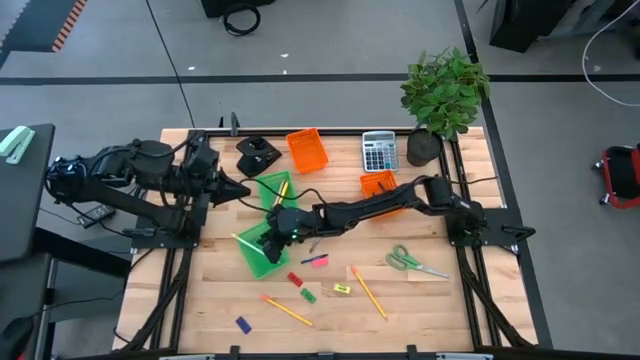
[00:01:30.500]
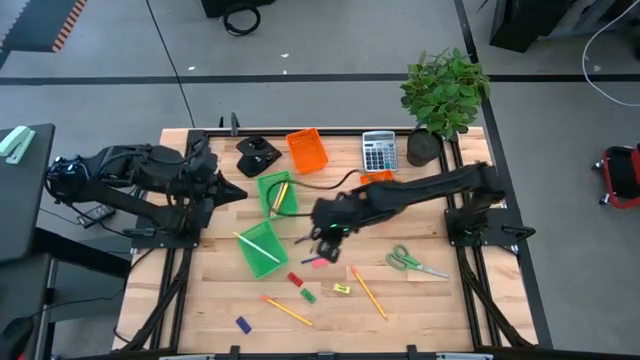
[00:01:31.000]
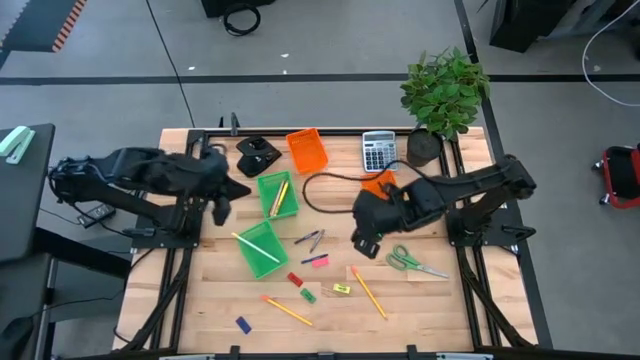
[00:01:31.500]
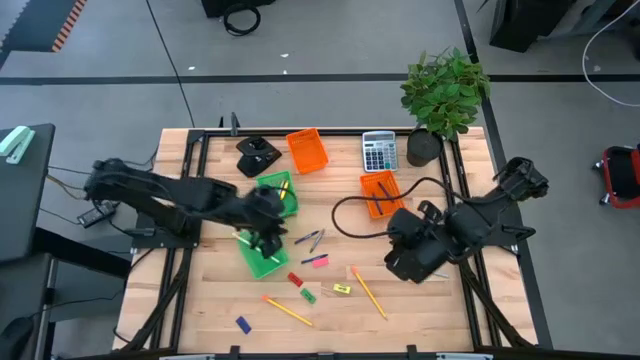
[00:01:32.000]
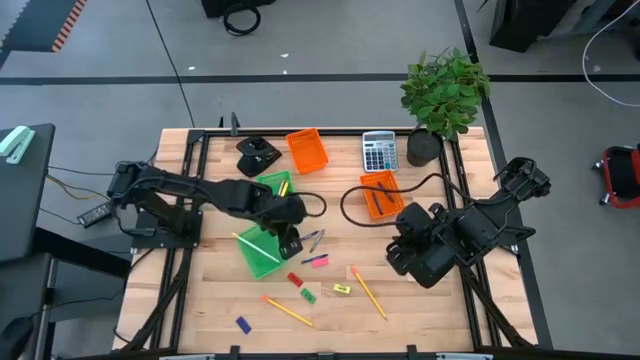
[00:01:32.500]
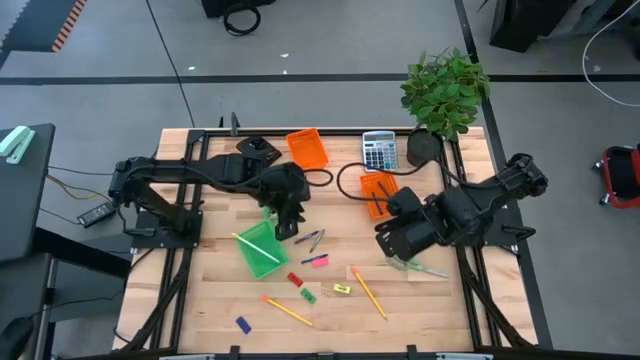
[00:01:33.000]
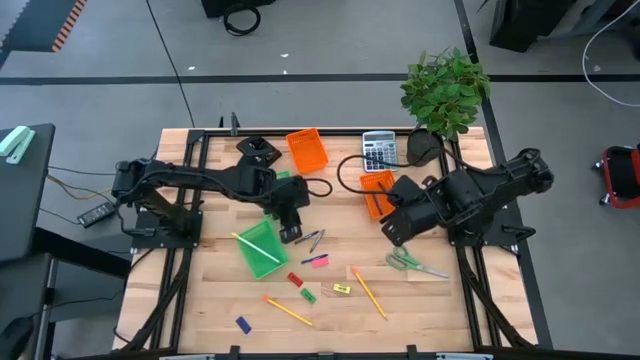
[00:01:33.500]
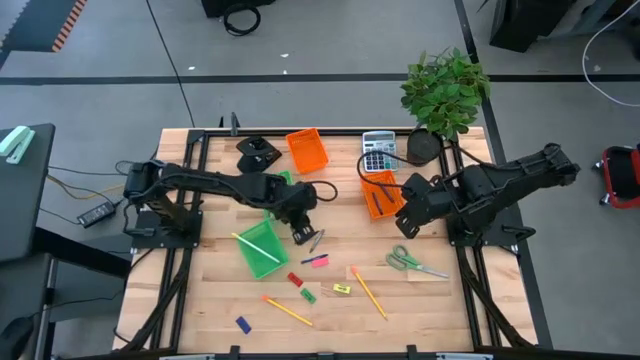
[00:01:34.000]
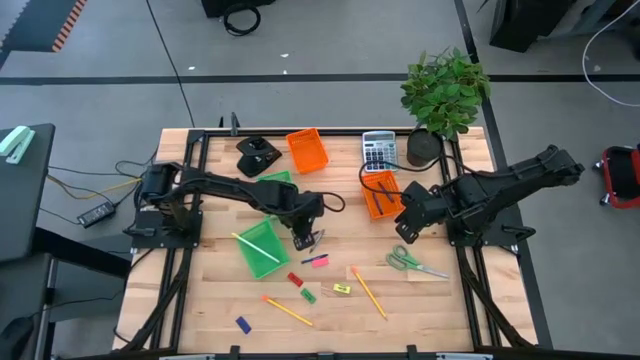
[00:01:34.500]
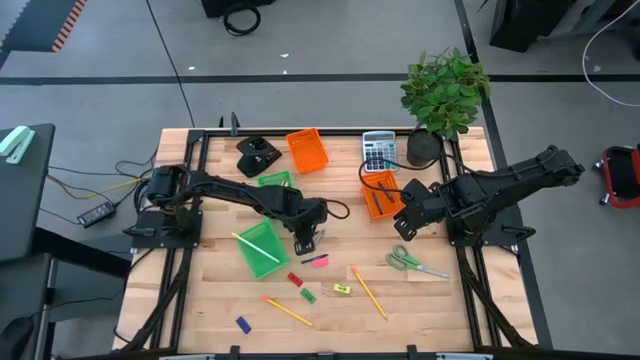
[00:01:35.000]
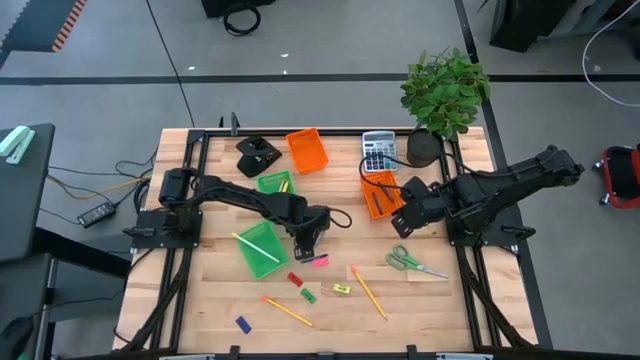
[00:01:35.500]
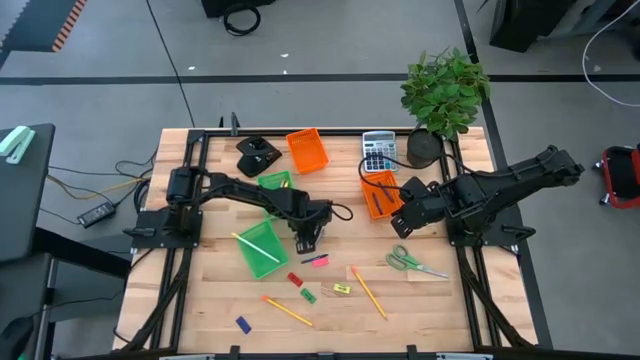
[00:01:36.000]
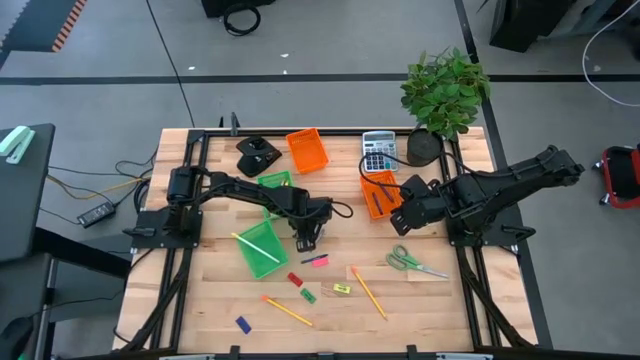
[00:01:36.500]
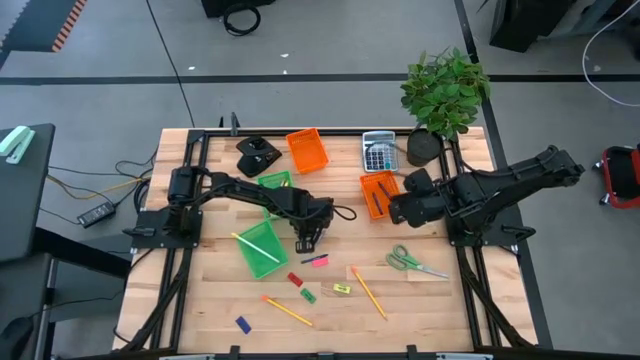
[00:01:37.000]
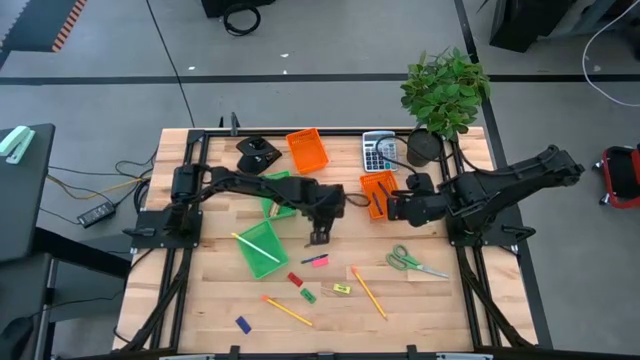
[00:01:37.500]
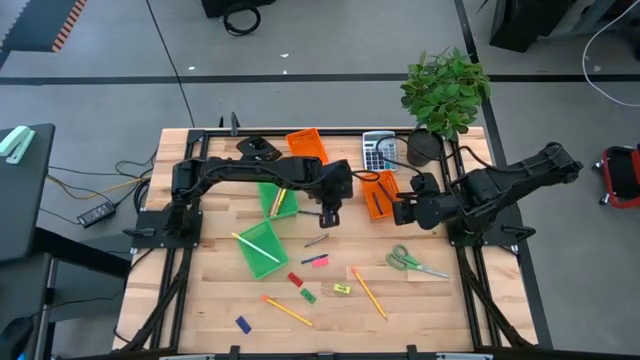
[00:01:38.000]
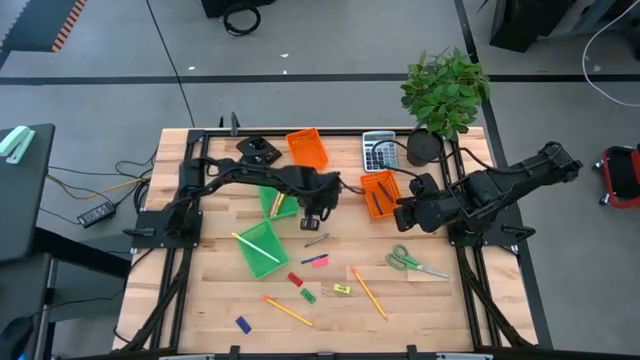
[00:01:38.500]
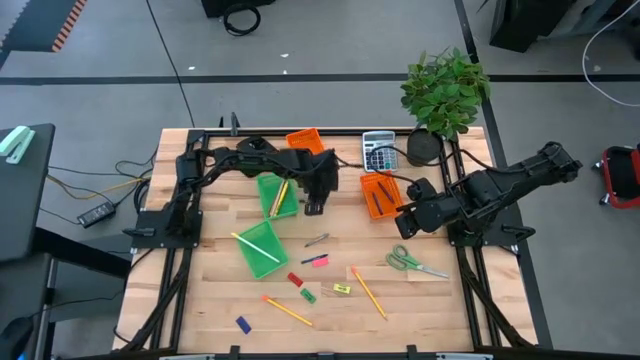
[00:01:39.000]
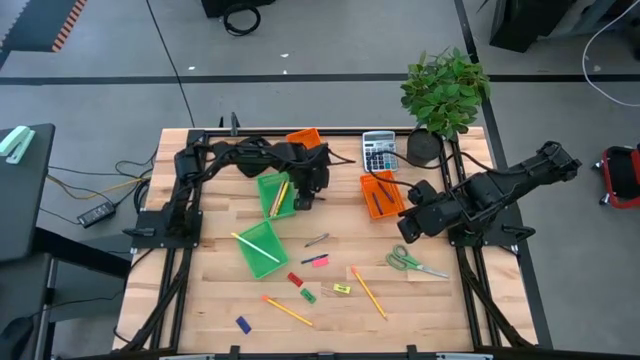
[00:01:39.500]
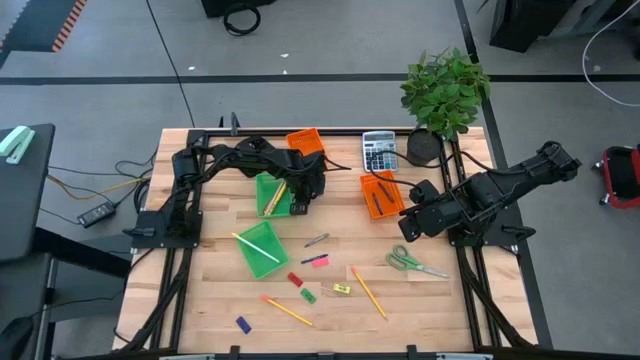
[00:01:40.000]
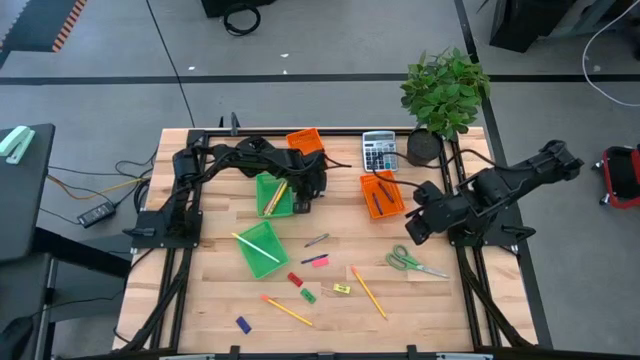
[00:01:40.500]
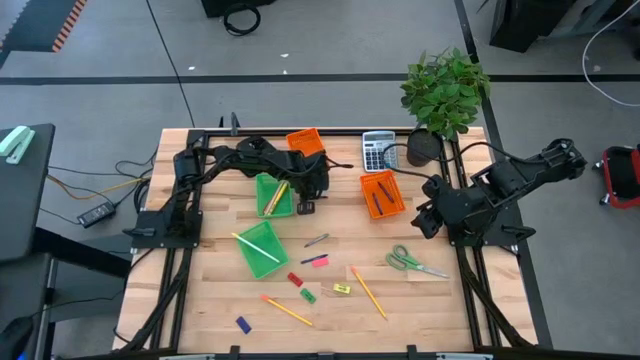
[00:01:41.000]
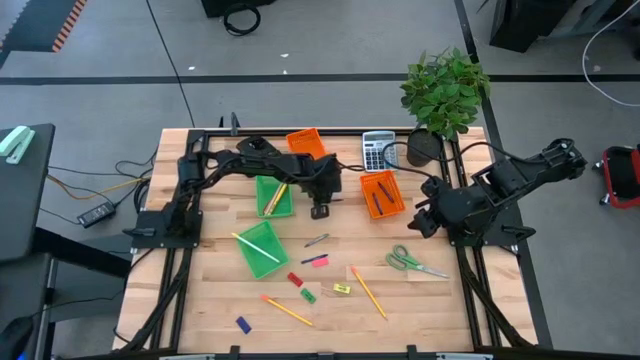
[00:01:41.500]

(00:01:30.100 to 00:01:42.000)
Task: Sort crayons/erasers/pens/pencils in bins
Put the top blue crayon into the bottom orange bin

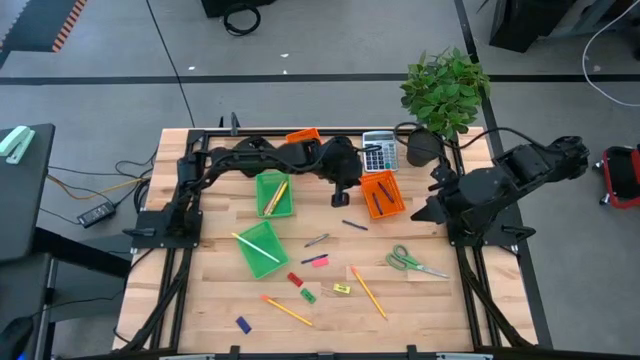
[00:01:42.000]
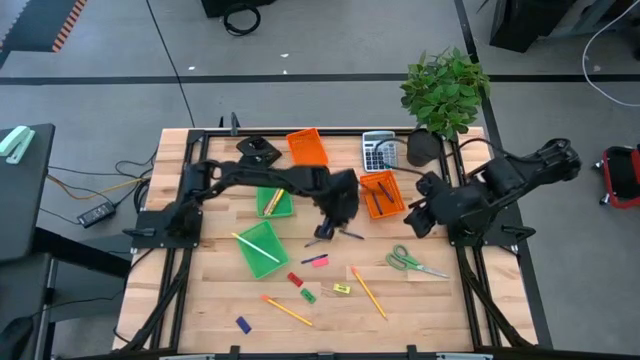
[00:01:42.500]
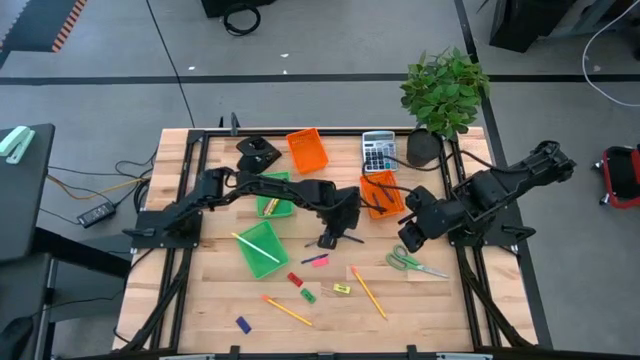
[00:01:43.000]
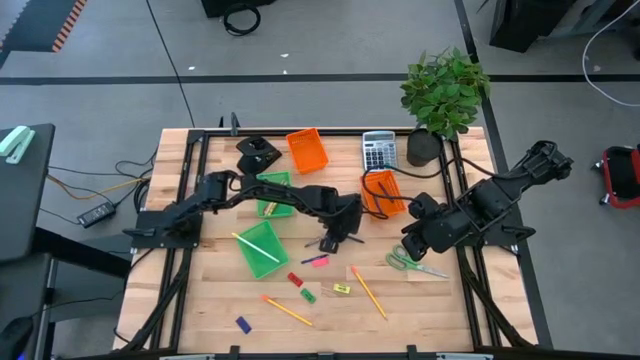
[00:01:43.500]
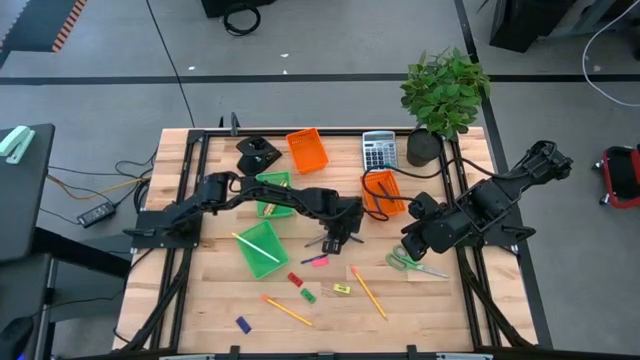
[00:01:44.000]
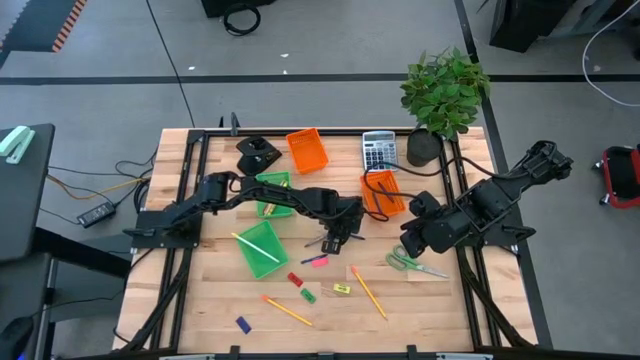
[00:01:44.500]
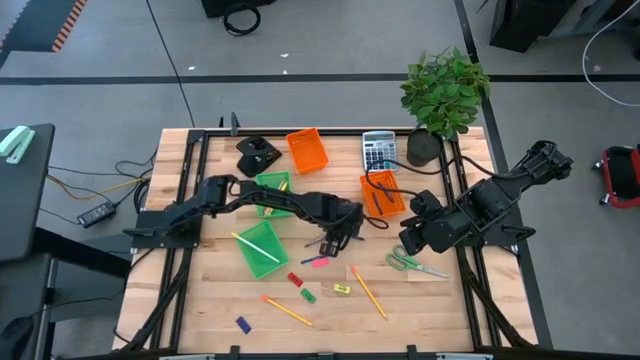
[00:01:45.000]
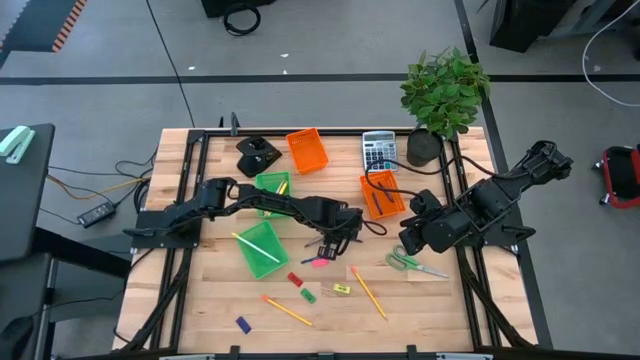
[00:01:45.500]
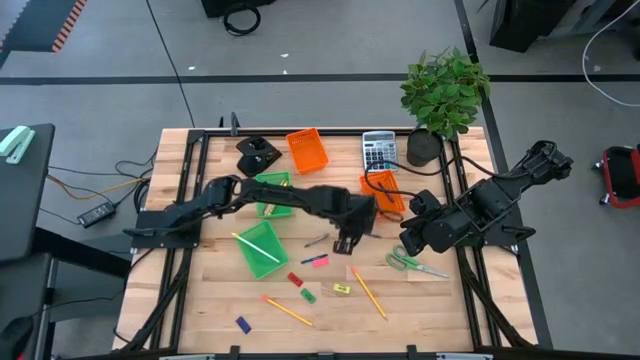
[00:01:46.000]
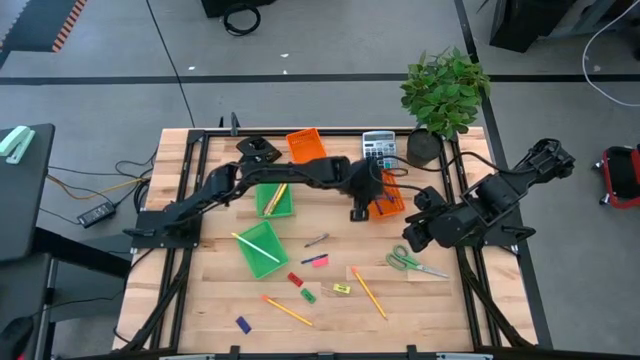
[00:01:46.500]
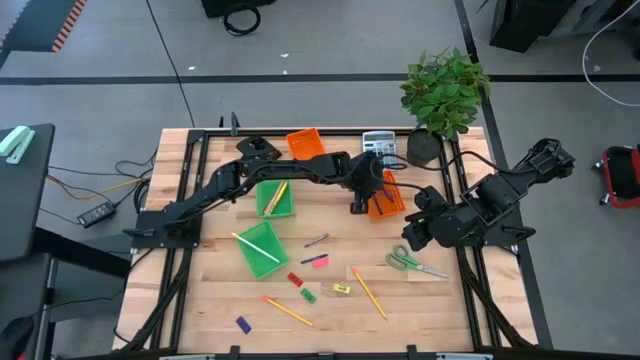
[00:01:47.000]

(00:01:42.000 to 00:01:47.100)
Put the top blue crayon into the bottom orange bin

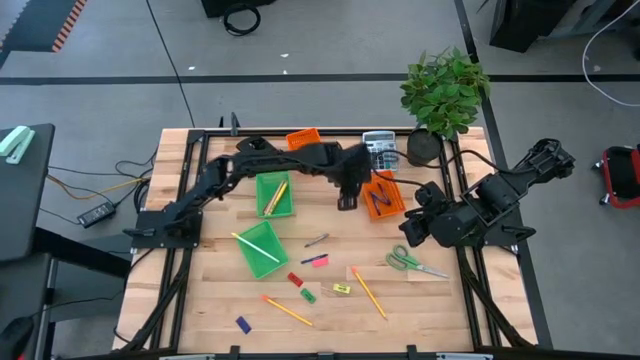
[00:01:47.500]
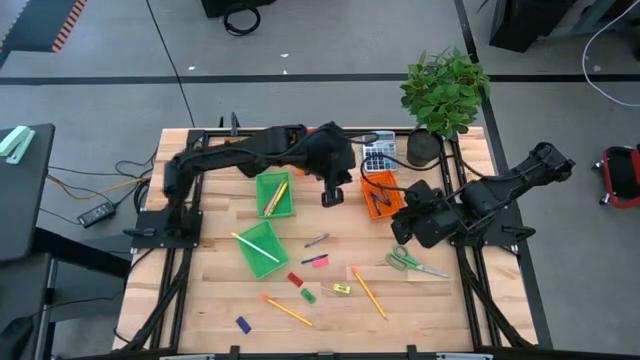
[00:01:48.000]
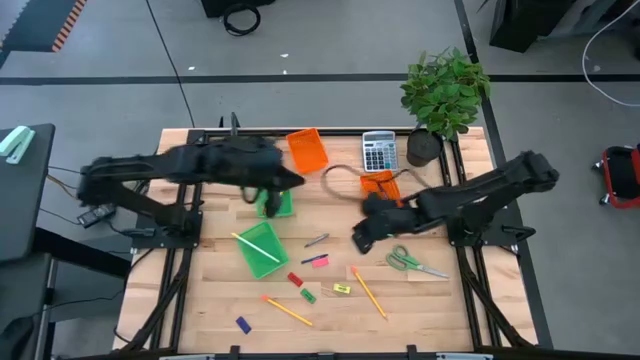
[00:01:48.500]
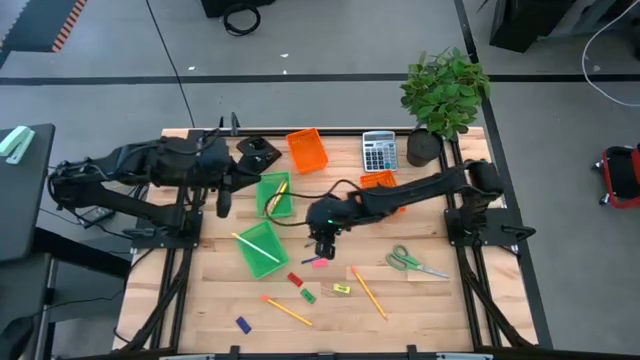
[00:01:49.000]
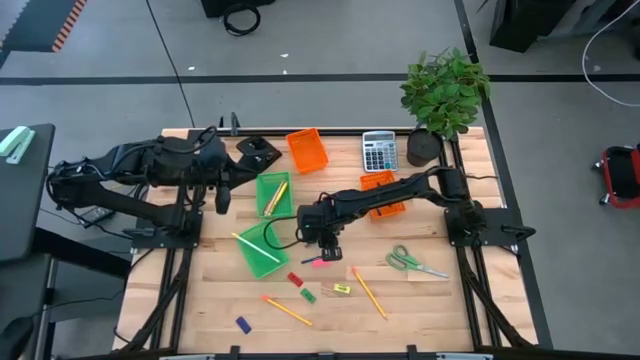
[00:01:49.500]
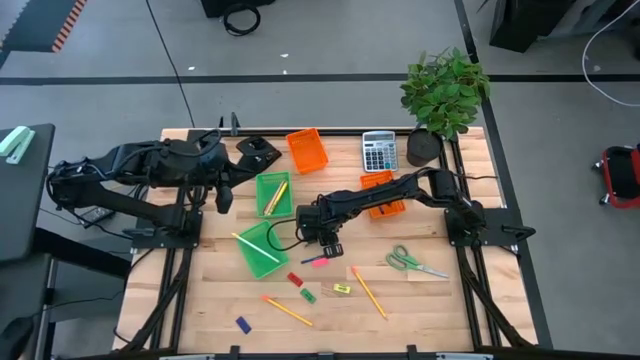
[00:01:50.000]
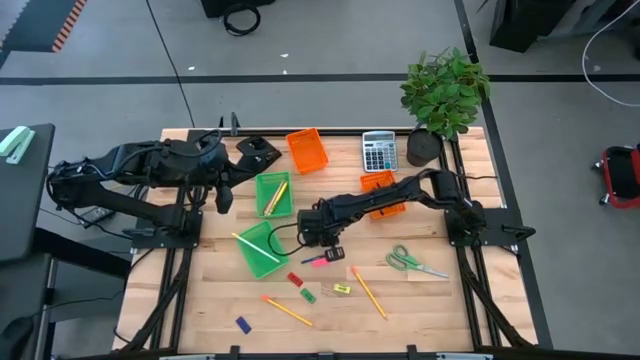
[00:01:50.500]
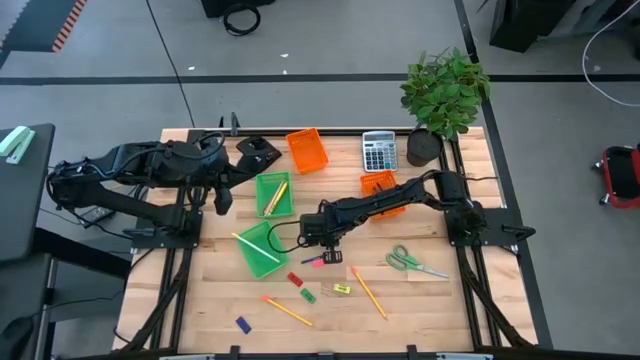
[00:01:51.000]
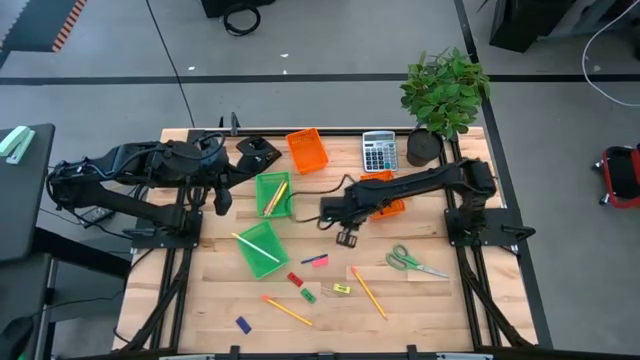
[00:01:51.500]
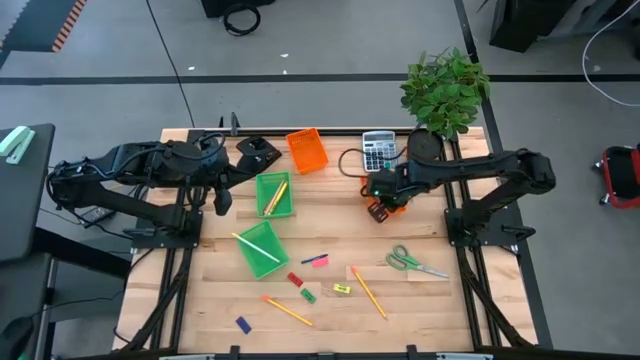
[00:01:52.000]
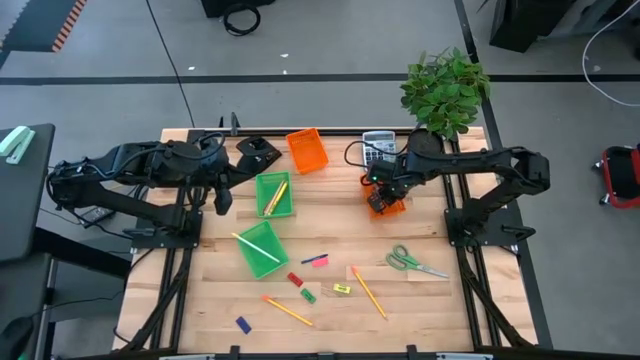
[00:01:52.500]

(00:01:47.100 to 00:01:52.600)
Put the gray crayon into the bottom orange bin
